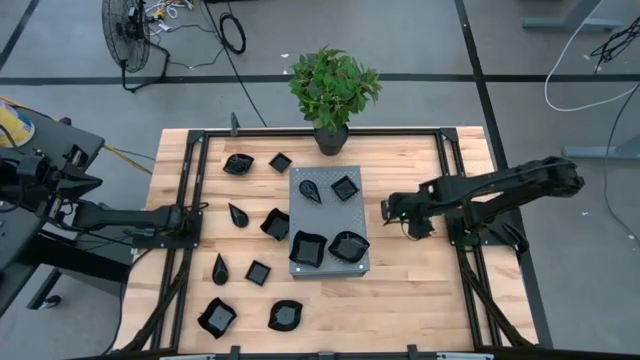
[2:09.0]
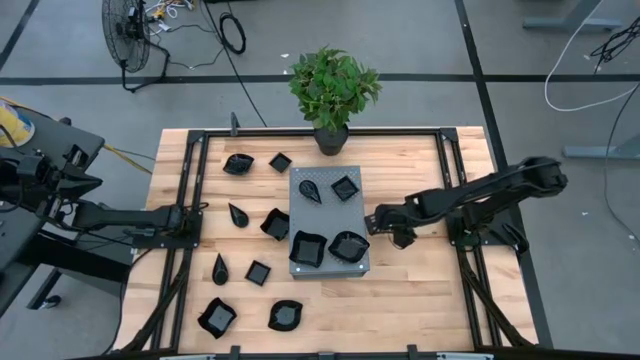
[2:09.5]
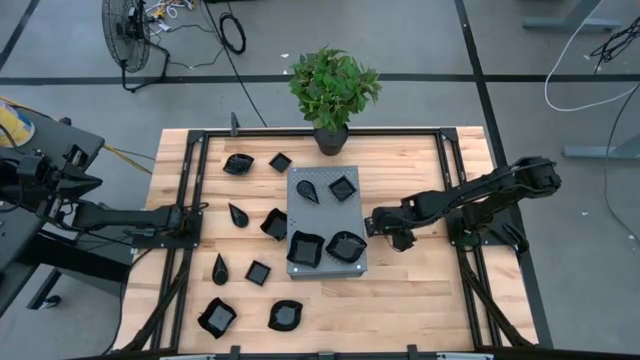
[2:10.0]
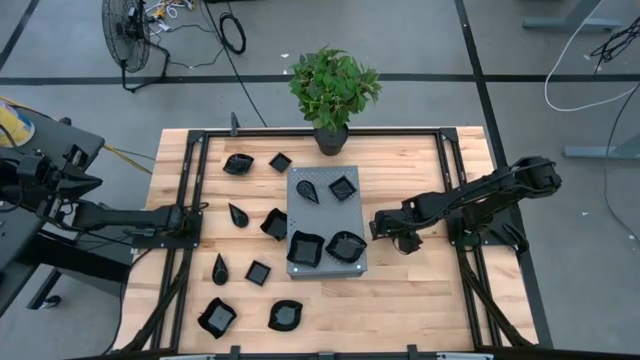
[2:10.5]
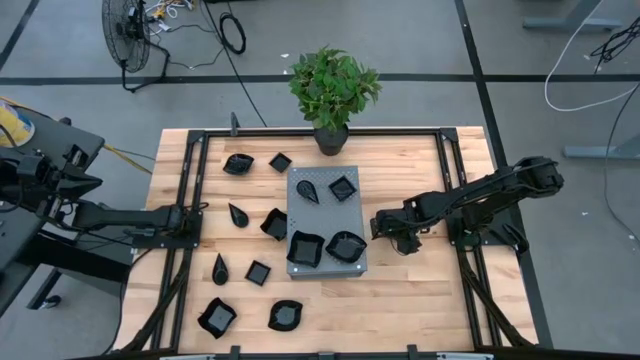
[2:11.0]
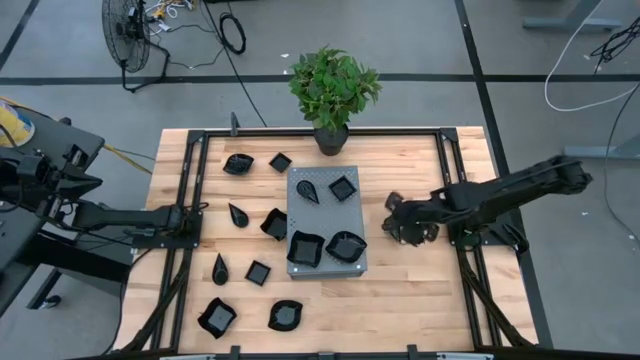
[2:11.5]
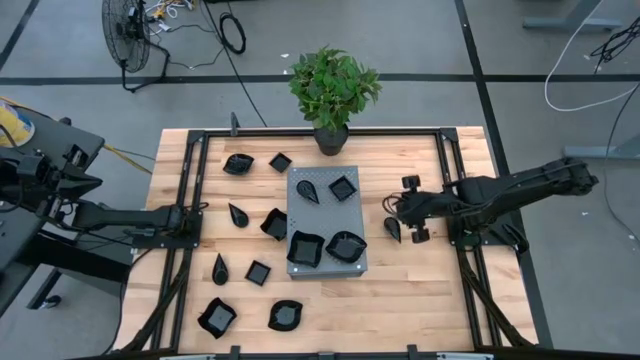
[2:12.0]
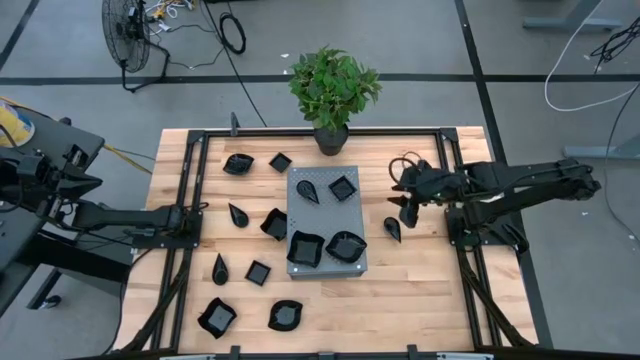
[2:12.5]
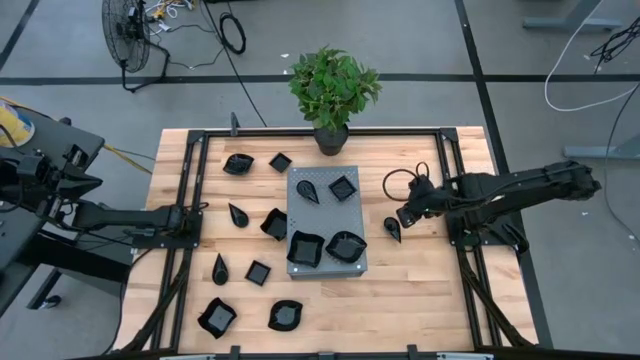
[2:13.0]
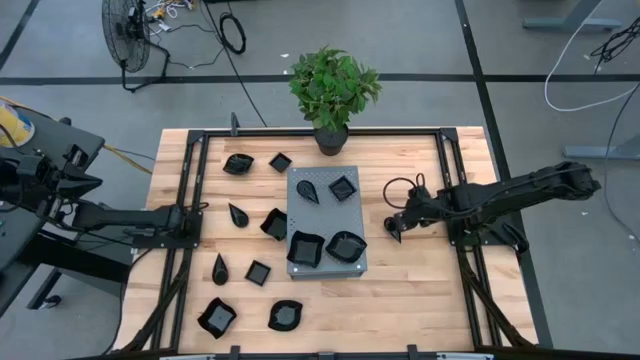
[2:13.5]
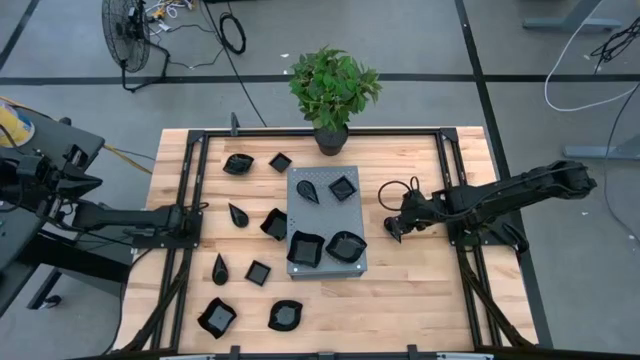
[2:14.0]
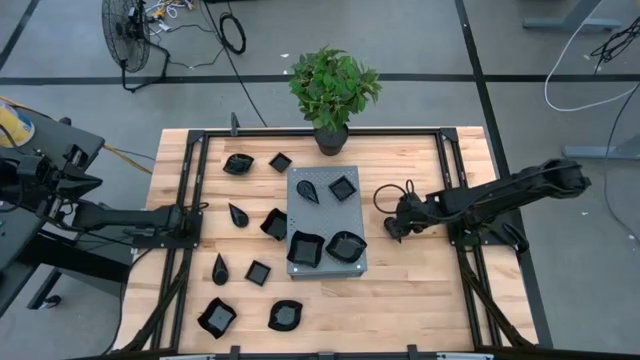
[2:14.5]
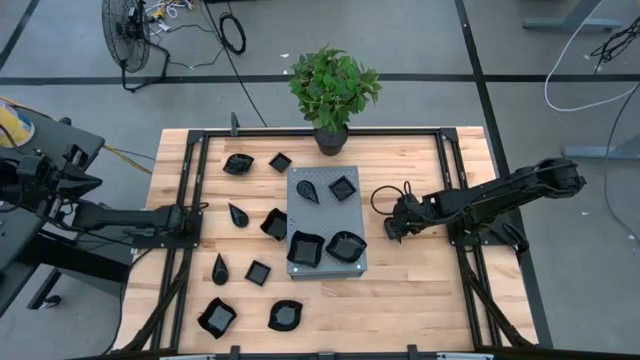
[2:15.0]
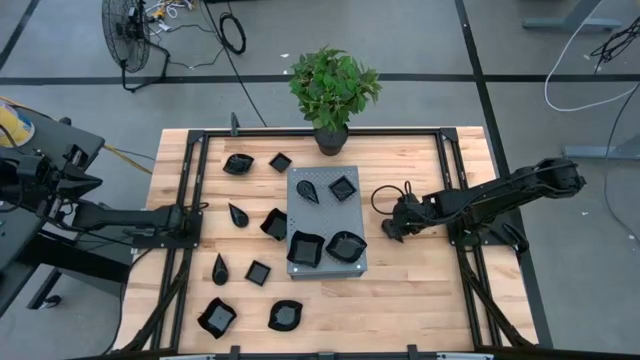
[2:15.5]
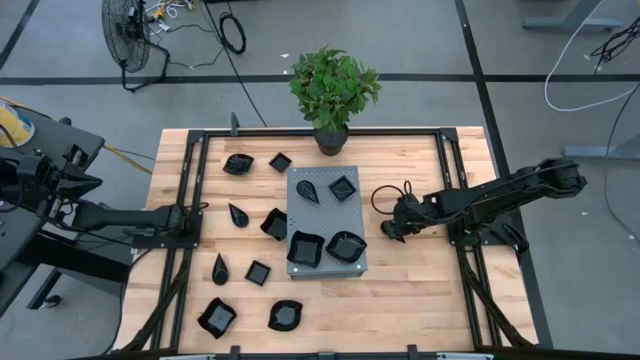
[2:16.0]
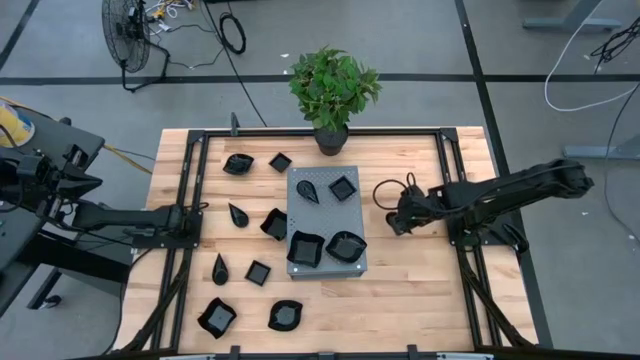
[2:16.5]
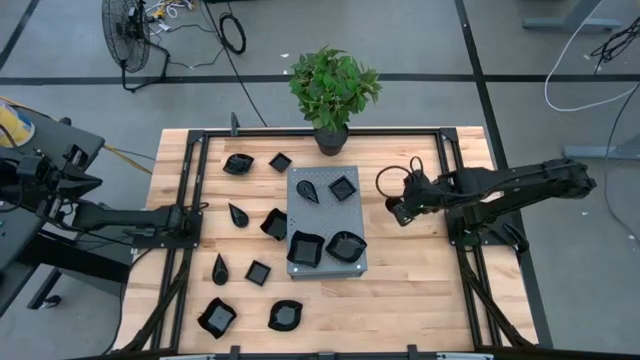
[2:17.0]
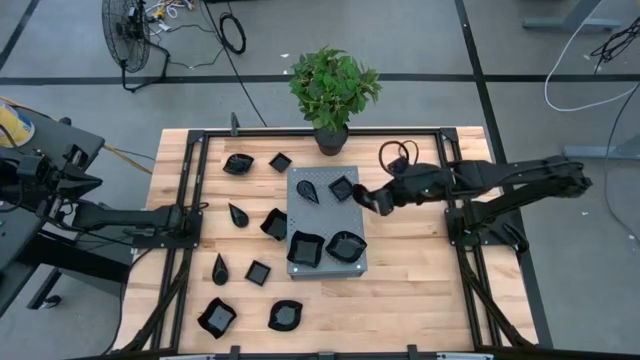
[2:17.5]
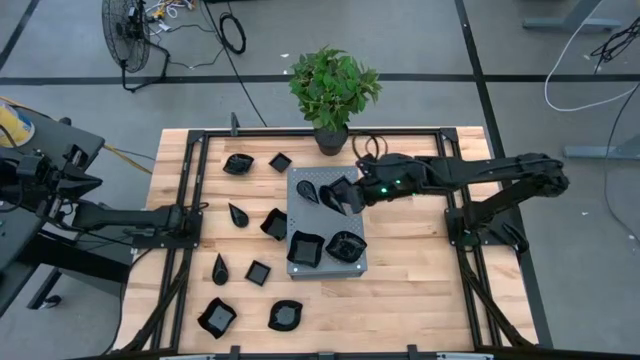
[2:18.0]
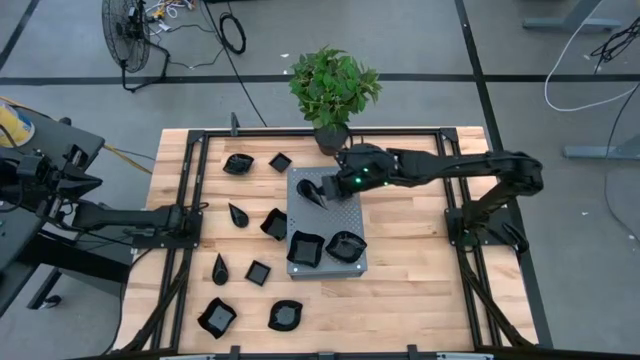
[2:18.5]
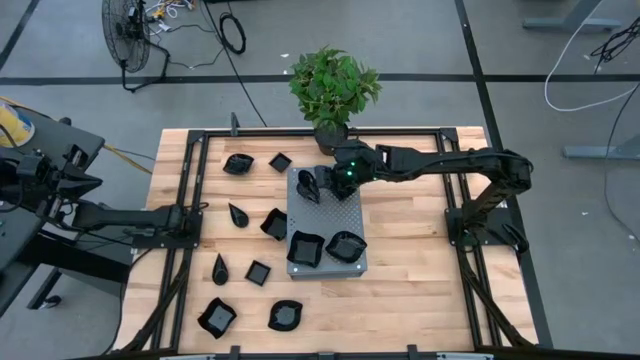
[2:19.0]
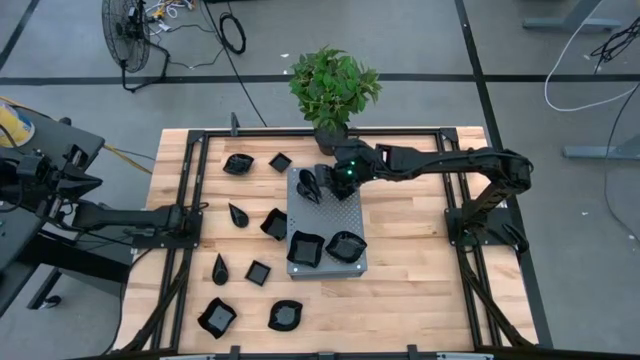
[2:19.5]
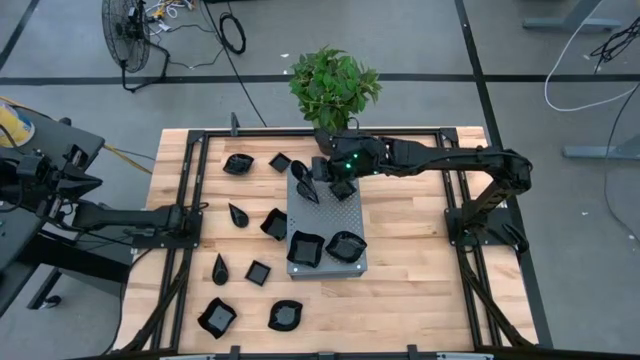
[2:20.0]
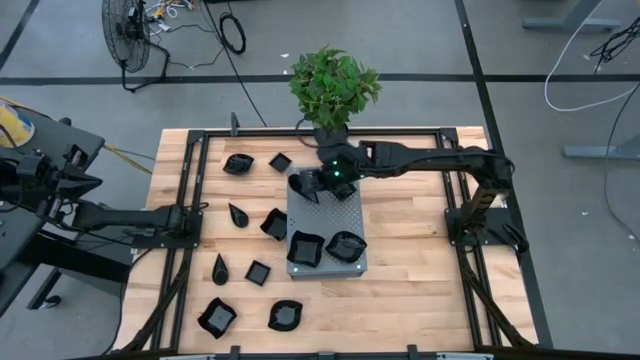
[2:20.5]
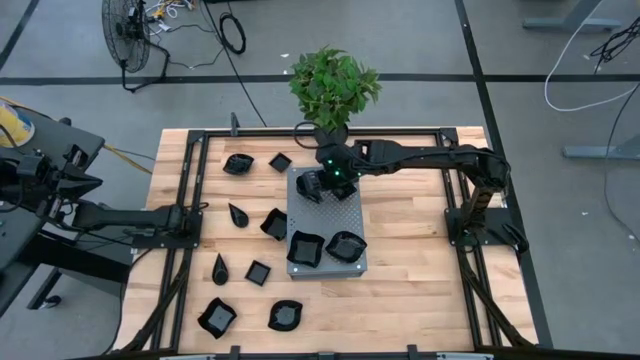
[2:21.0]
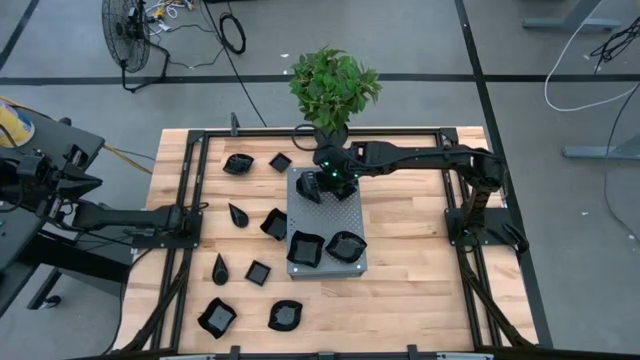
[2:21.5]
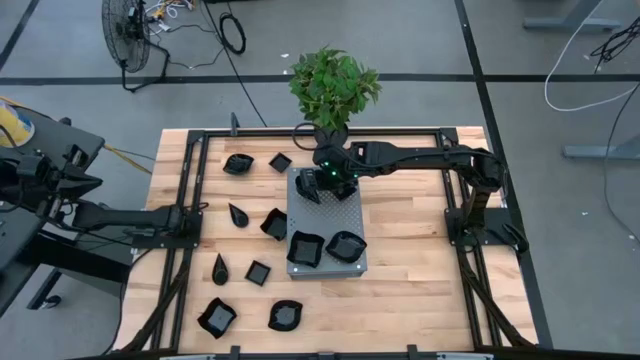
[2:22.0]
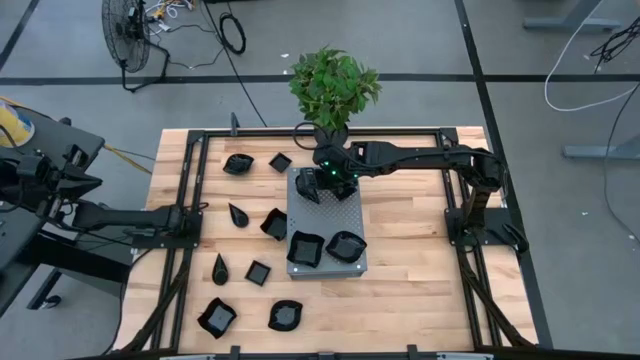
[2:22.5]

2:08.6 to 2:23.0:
Task: Pick & Place Mini shaped plates
Stack the black bowl on top of the black bowl on the shelf

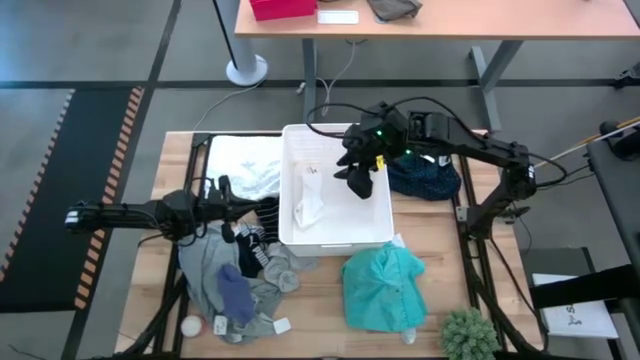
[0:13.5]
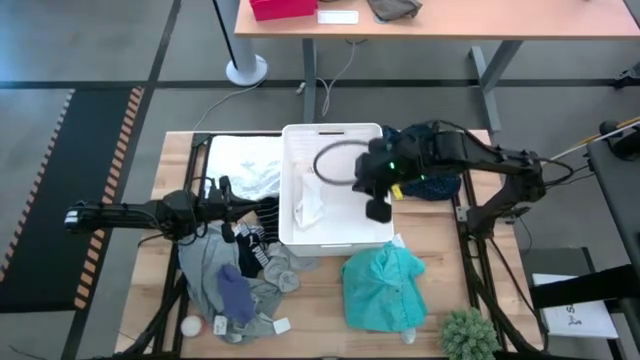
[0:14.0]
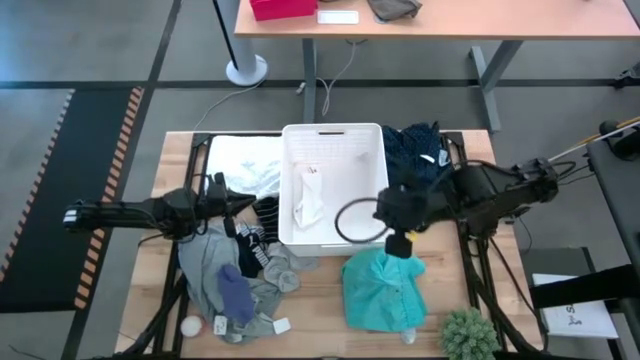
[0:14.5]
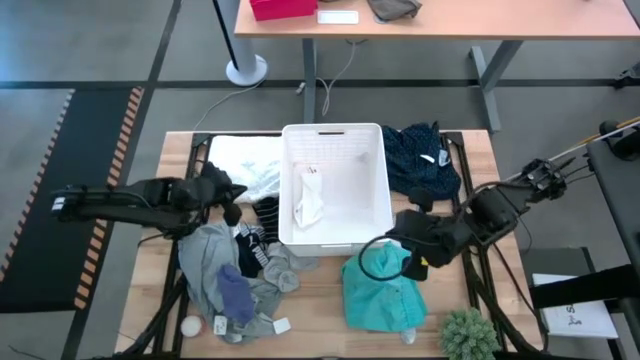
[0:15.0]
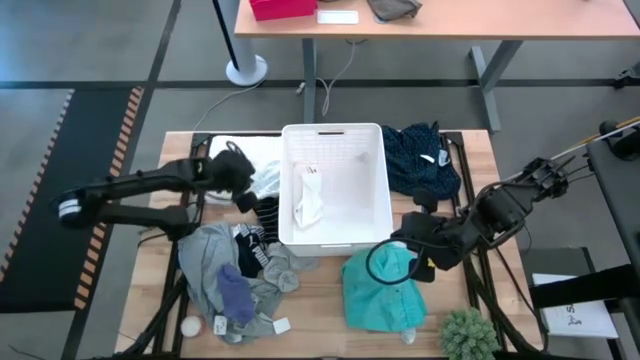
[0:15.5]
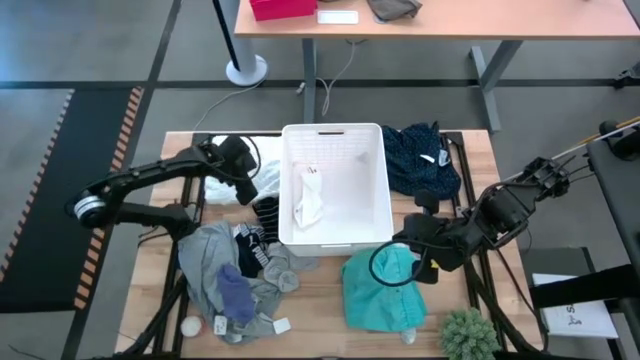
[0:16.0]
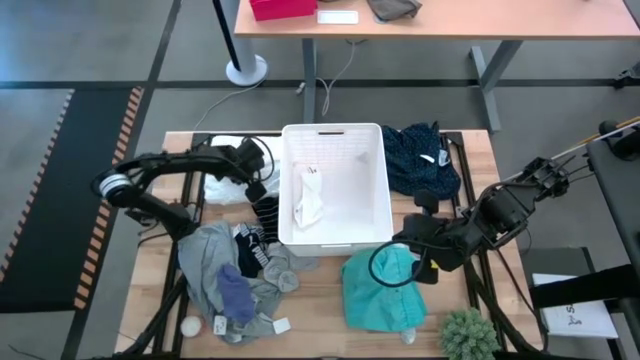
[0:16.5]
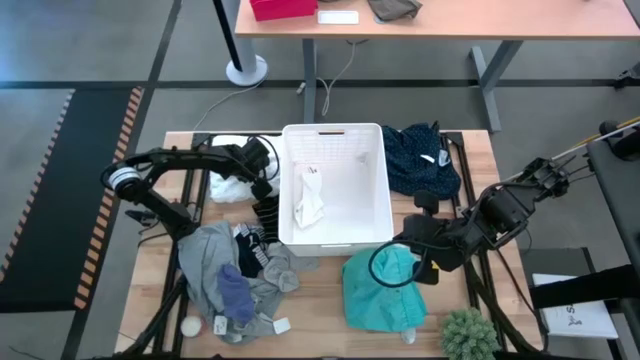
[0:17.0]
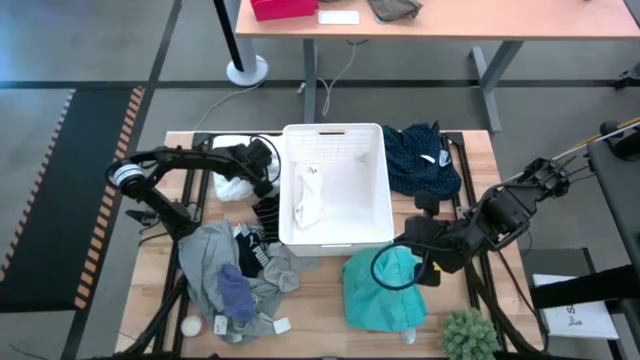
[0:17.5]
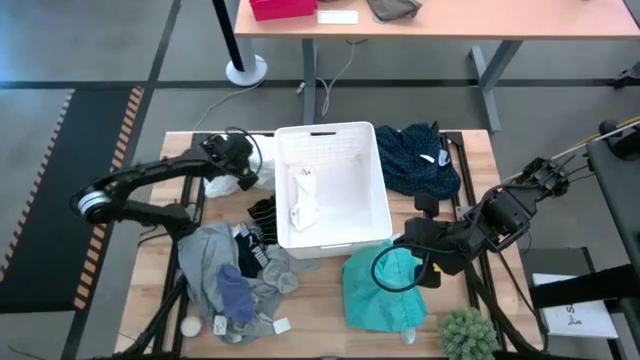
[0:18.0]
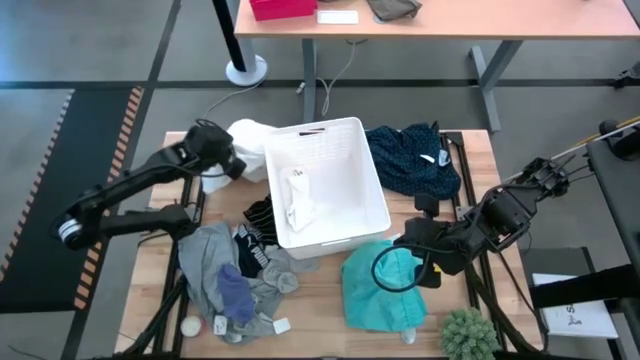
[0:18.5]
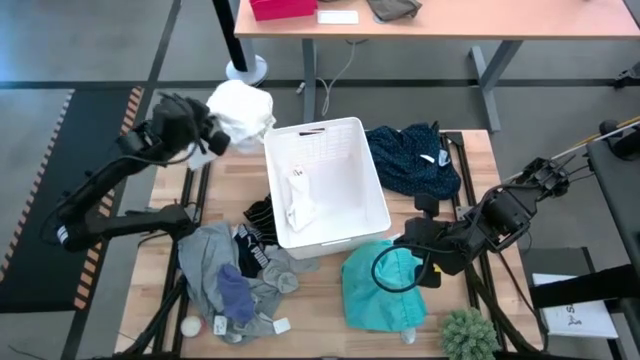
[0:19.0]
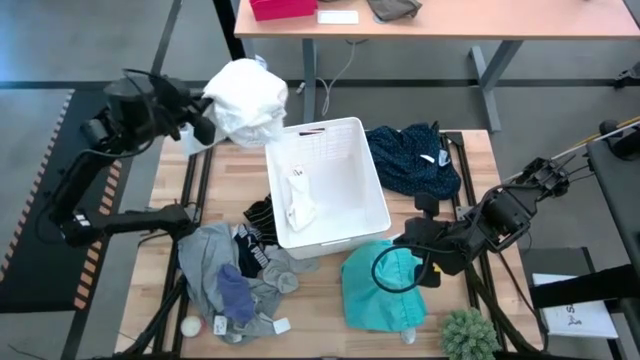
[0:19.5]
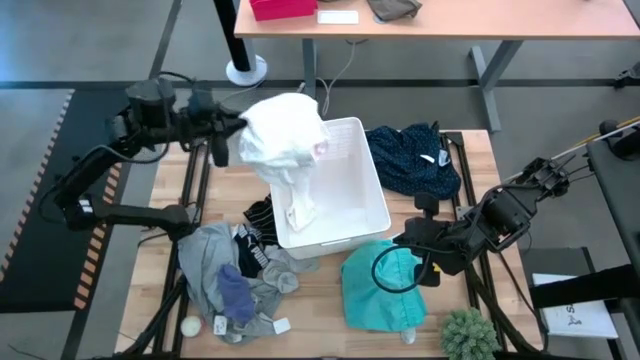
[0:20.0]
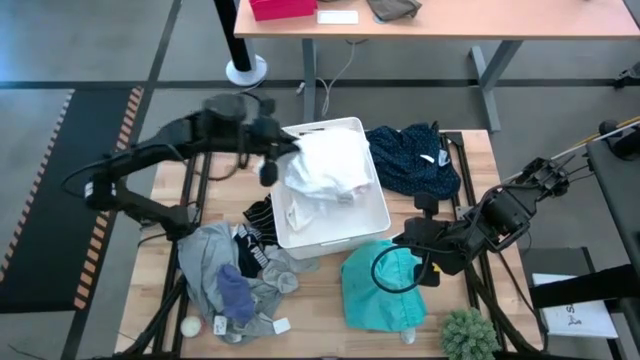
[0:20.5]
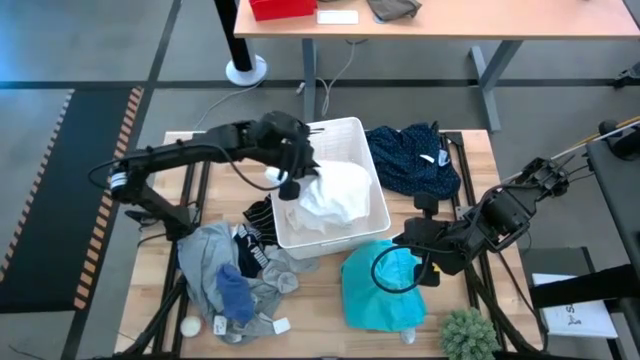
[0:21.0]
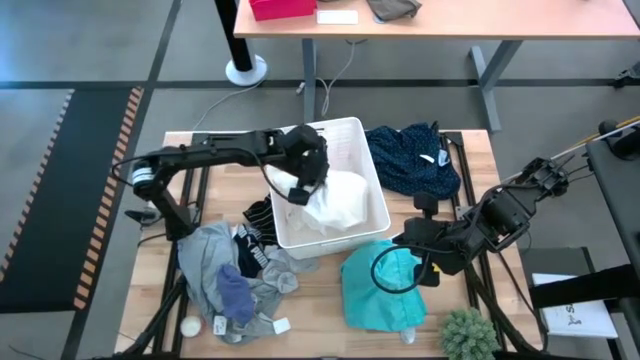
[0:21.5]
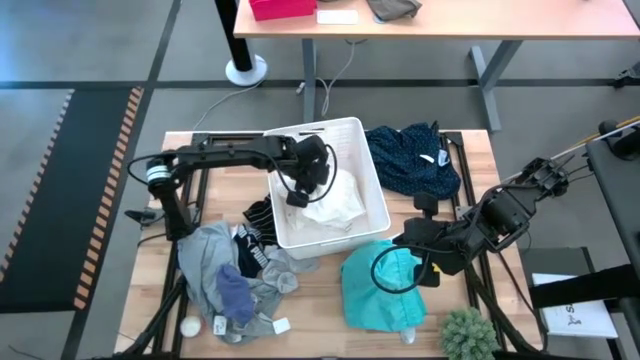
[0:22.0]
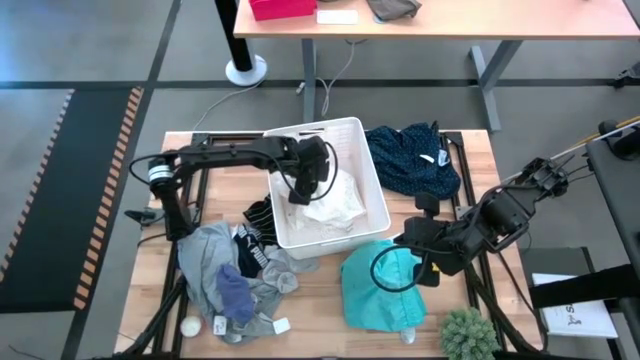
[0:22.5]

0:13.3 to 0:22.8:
Task: Sort clothes
Put the white shirt into the white bin
